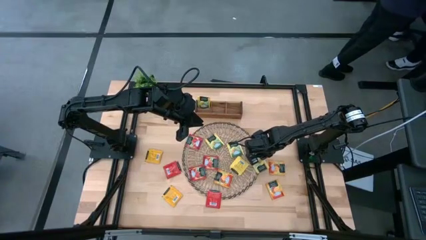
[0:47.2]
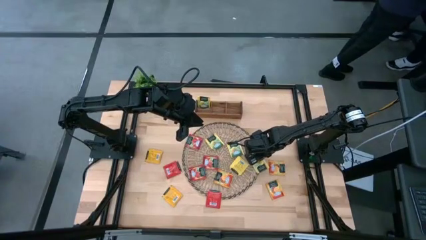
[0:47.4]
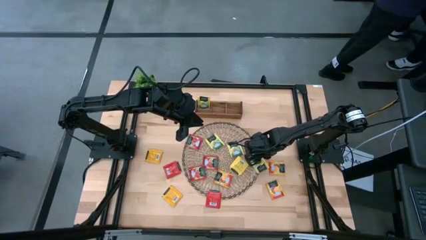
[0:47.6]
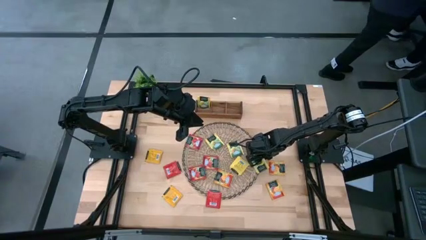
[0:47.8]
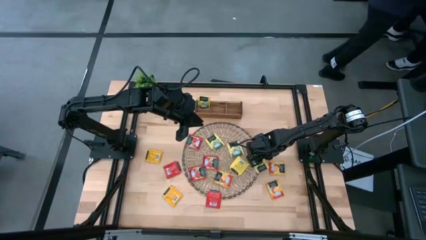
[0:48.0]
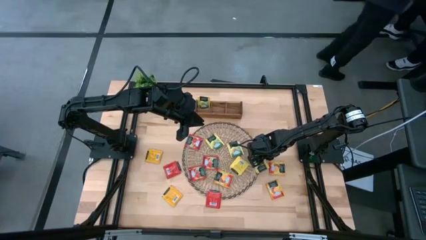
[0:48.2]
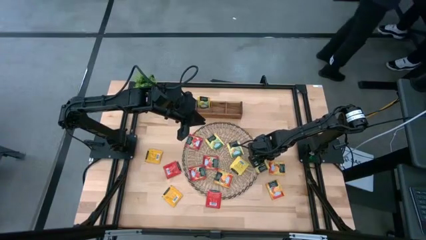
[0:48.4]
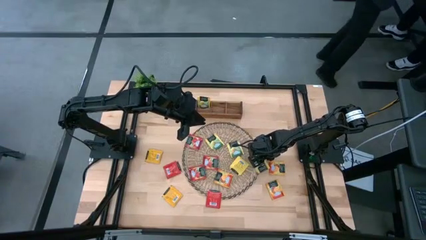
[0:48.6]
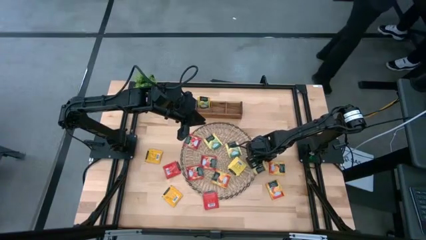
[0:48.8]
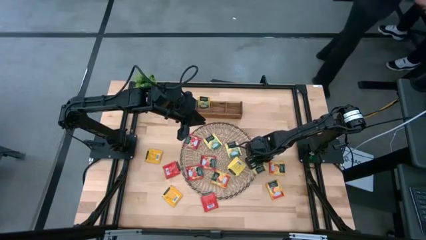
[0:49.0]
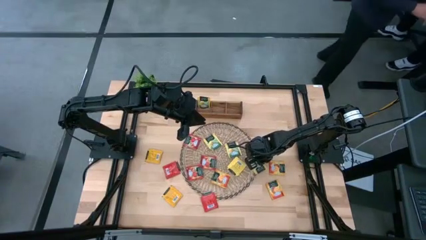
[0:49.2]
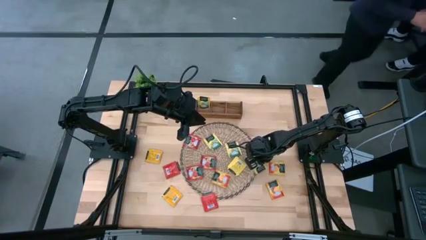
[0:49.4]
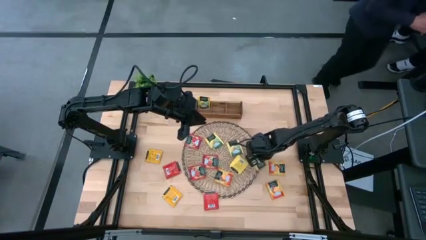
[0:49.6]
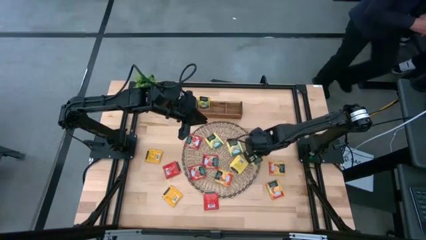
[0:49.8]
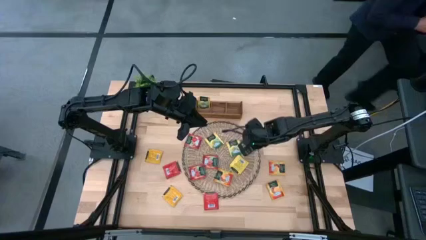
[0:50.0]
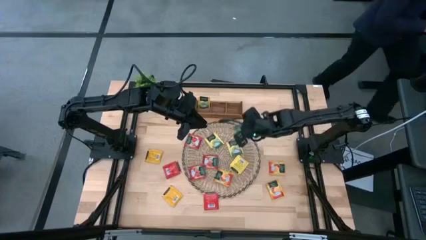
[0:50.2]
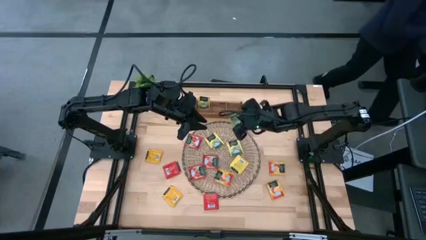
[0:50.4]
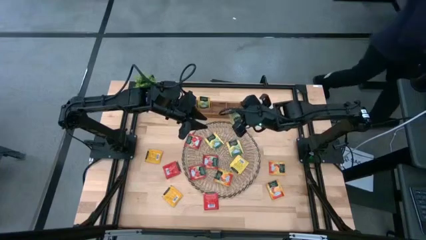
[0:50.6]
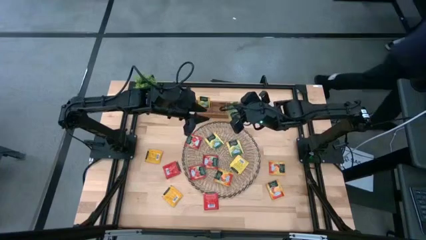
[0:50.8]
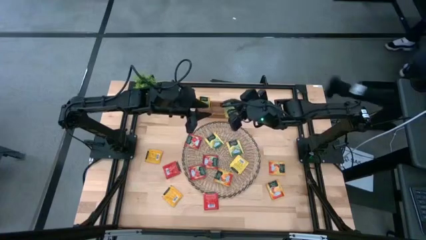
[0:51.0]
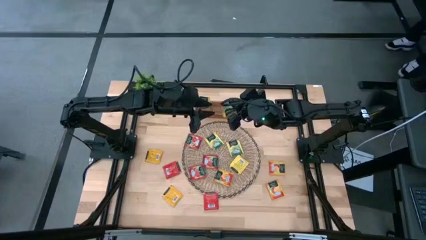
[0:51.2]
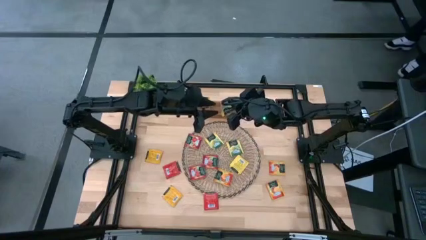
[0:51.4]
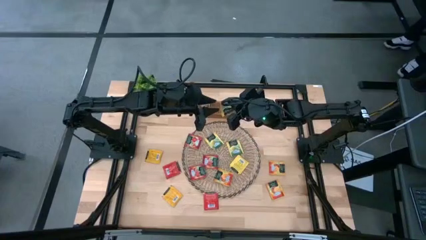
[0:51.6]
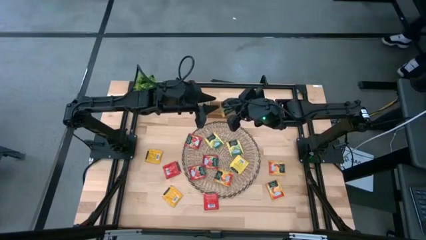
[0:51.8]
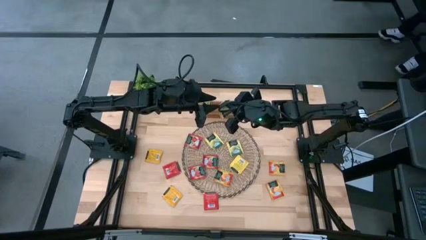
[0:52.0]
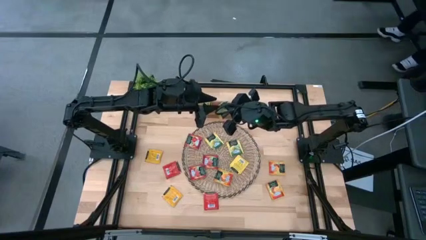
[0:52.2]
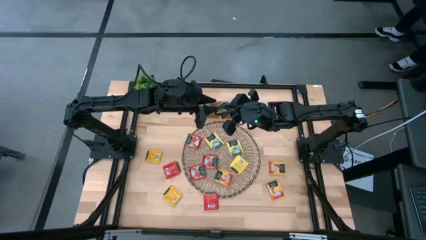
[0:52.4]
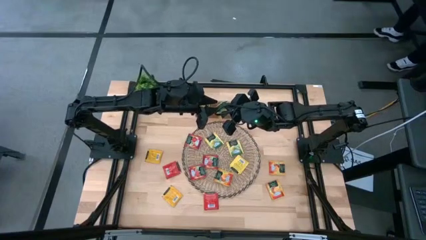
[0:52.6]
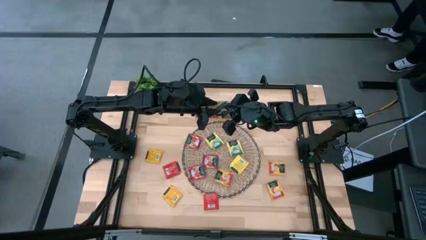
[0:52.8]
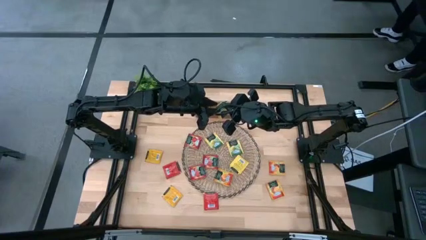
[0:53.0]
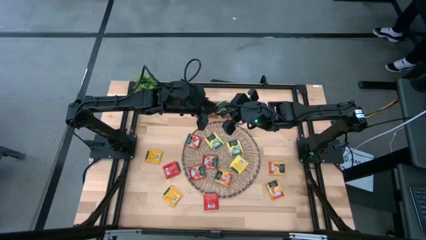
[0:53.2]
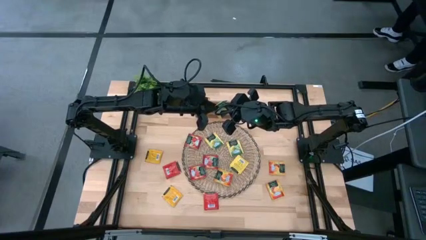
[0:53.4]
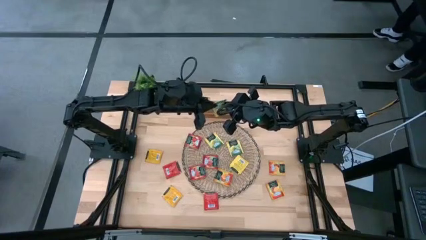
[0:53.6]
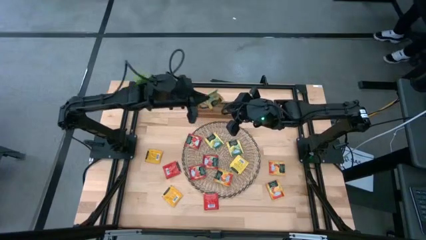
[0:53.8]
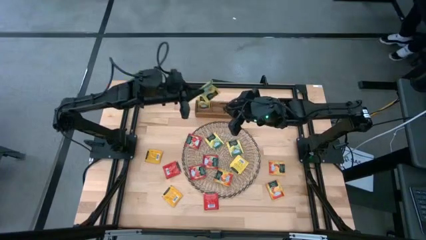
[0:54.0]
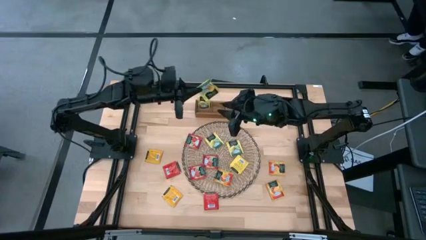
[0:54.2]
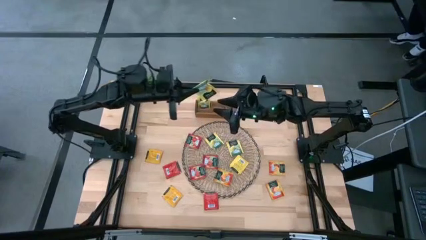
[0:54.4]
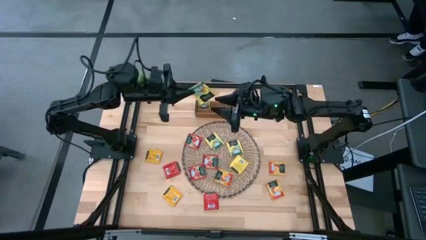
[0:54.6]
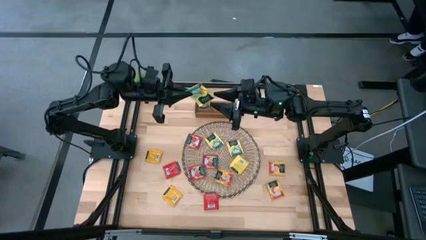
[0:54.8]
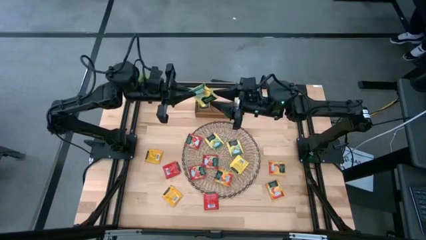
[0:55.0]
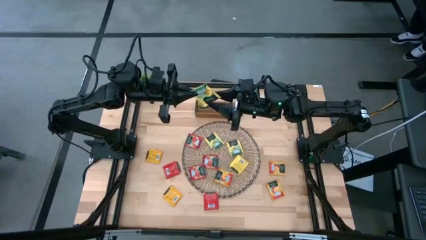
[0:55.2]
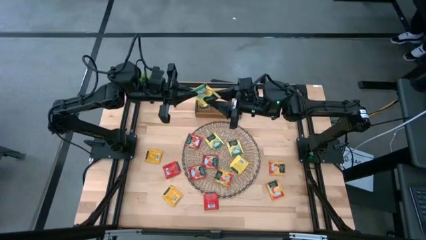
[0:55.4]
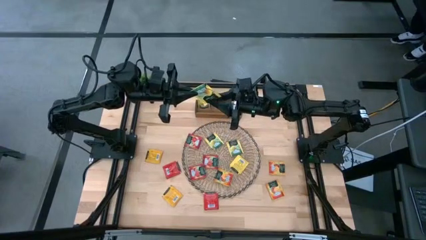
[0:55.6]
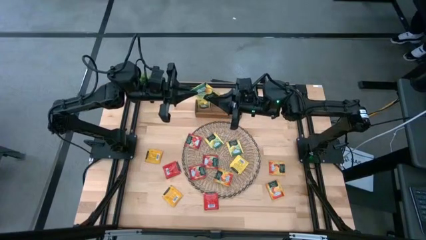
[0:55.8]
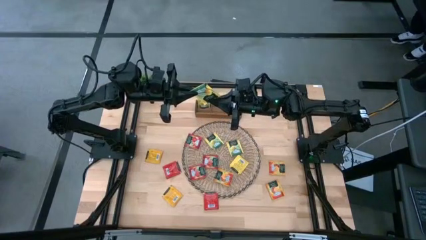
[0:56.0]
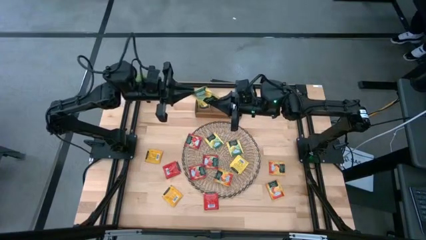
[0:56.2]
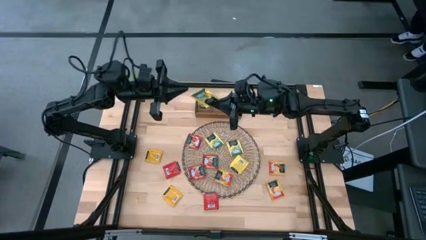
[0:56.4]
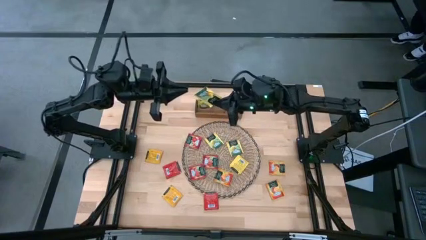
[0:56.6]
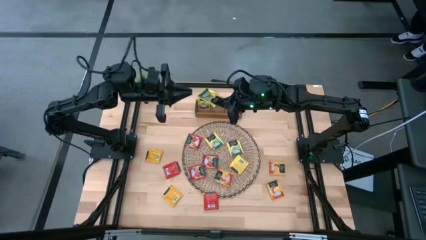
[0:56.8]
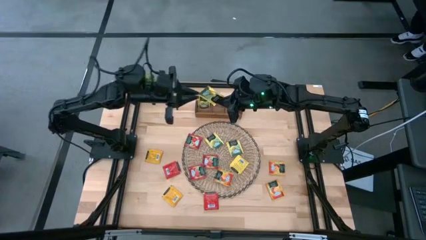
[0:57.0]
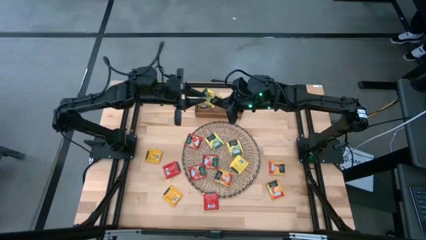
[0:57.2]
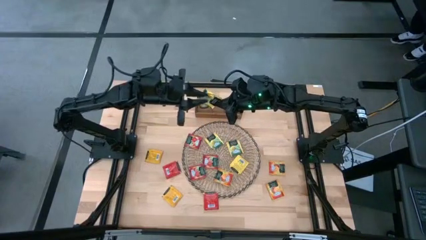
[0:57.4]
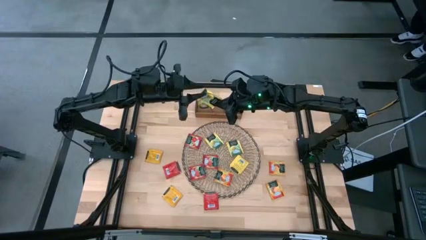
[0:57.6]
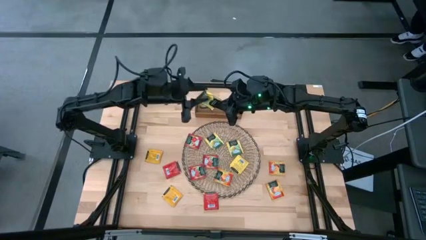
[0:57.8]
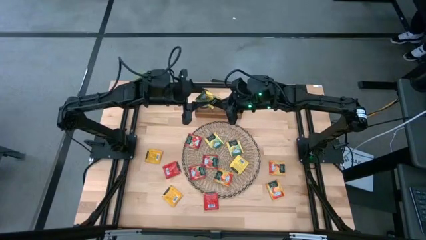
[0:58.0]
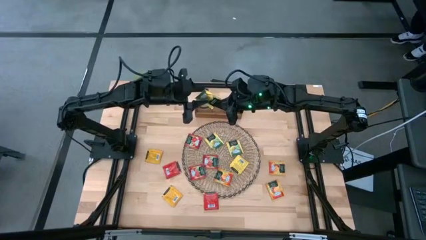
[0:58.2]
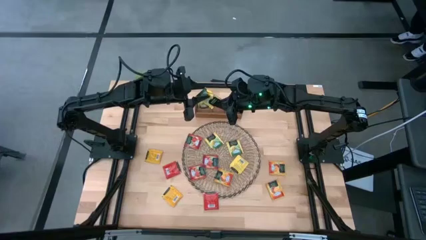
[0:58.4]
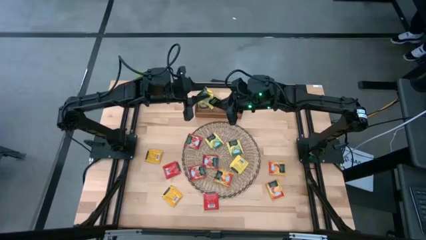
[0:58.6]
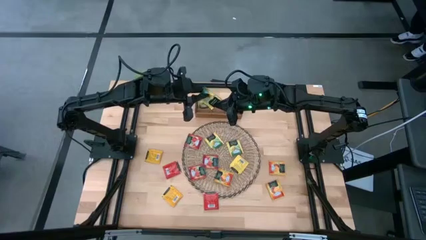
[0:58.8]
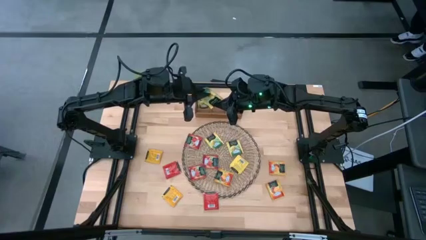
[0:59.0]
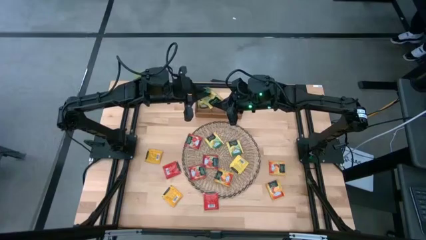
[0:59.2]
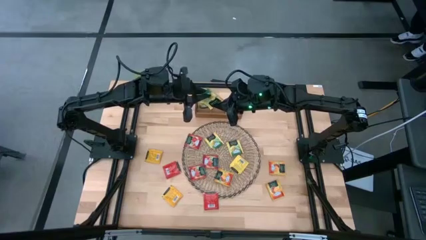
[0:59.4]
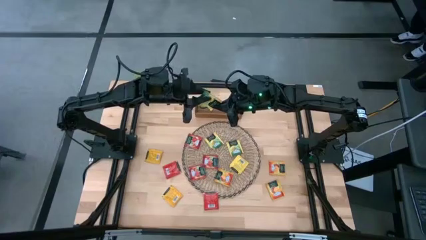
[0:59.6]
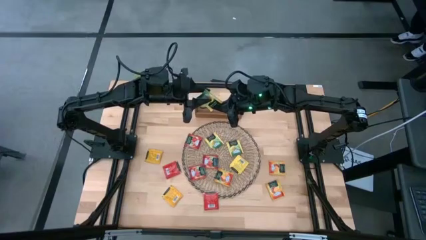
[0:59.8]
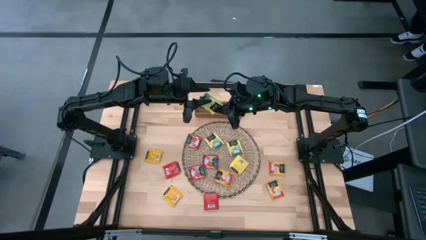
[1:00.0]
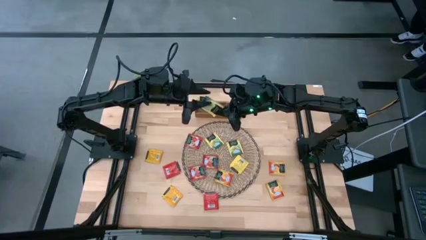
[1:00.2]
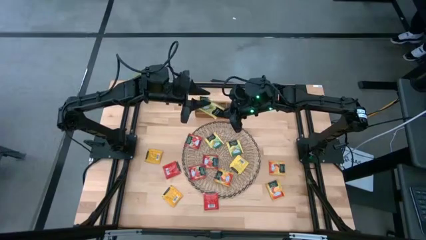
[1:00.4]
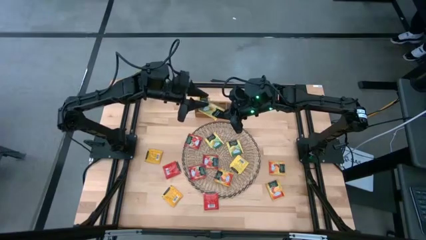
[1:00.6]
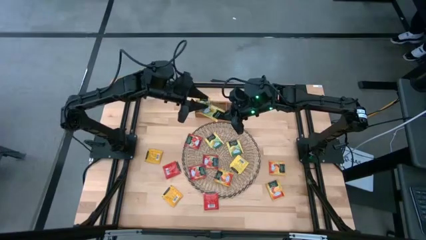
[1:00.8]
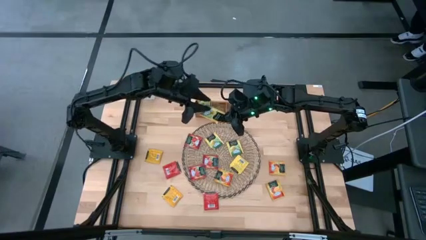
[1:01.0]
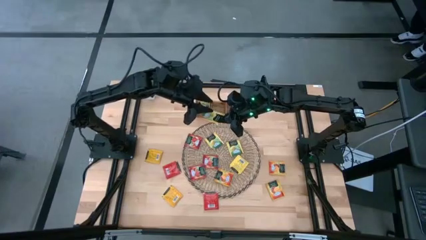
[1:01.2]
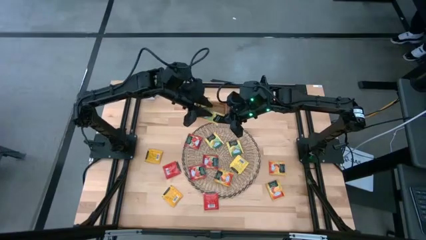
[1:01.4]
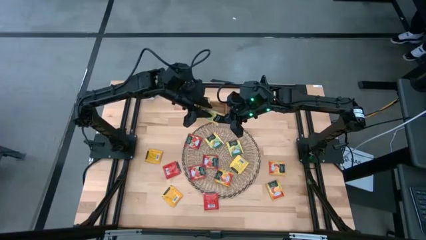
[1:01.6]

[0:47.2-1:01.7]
Task: Pick & Place Tea
Put the yellow tea bag into the left of the wooden organizer
